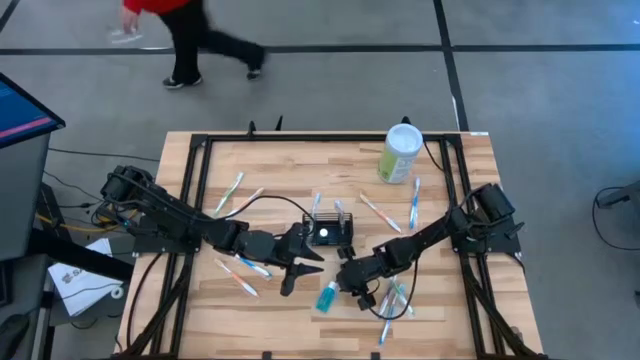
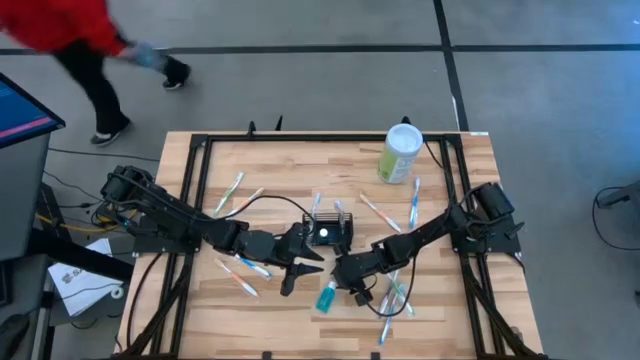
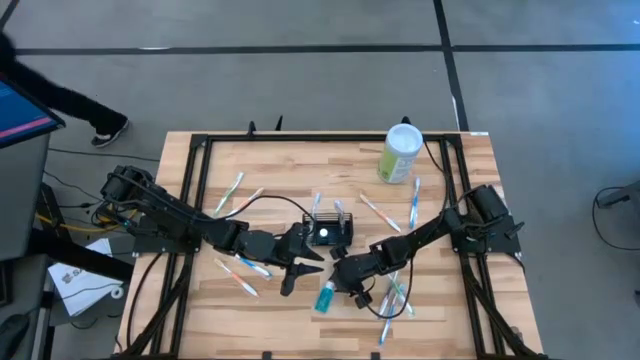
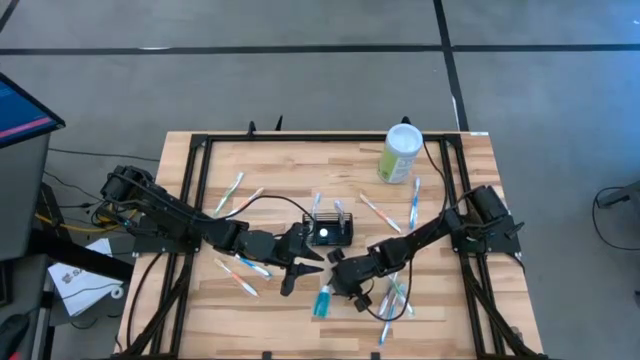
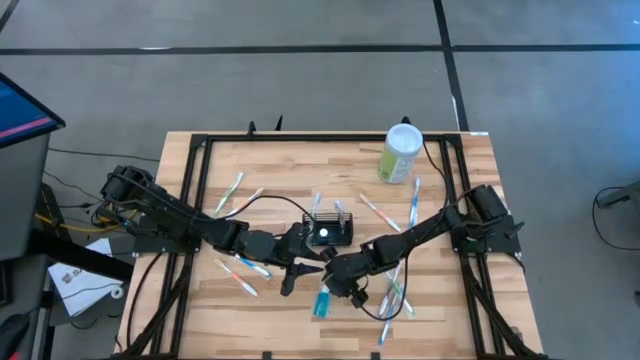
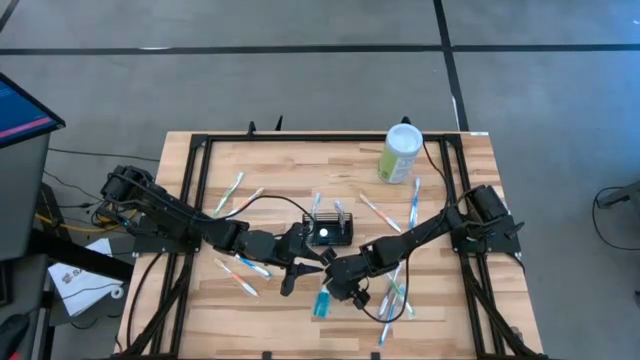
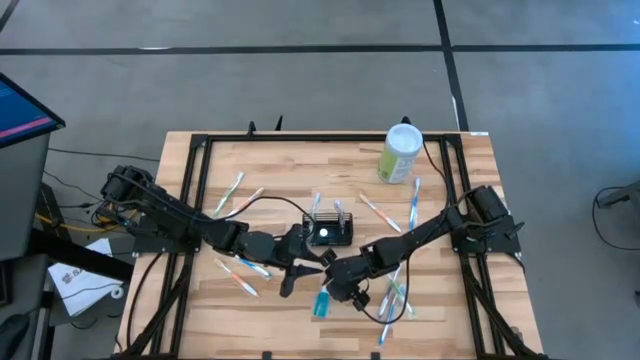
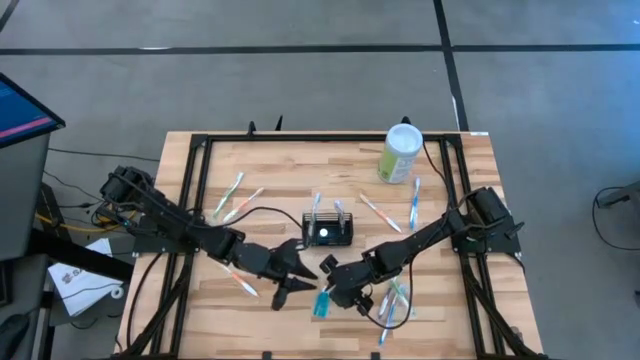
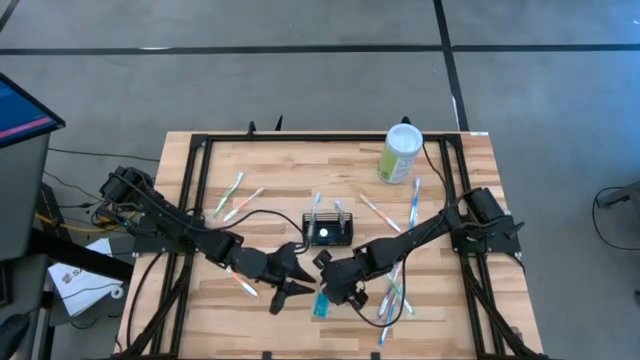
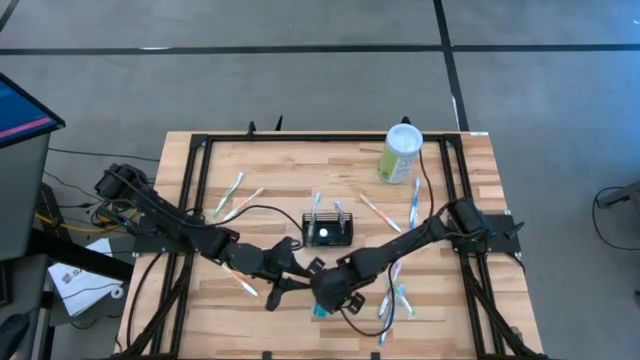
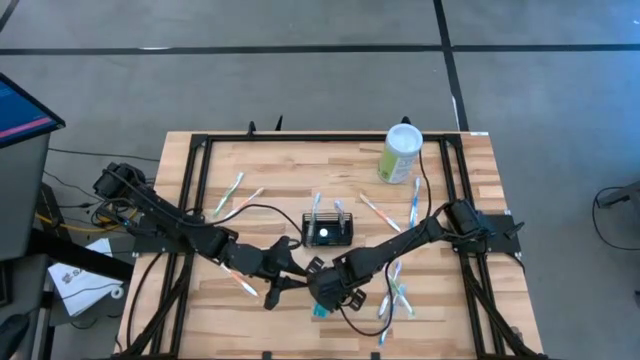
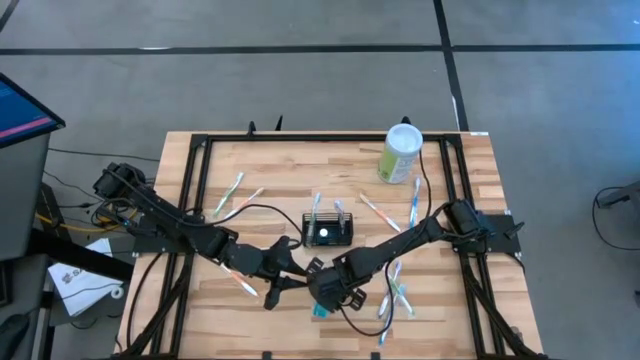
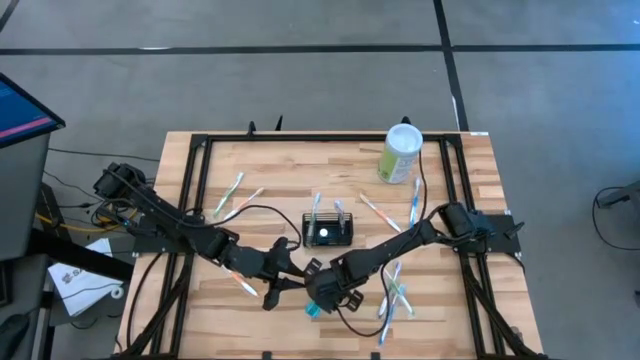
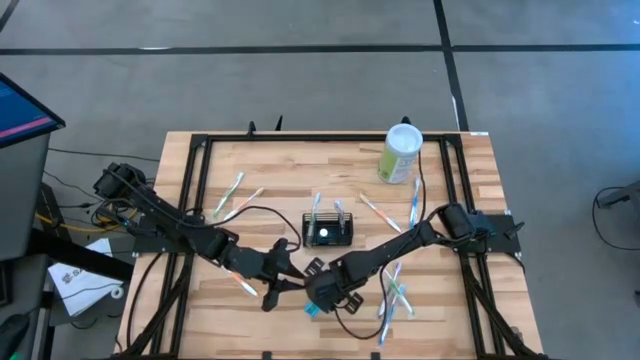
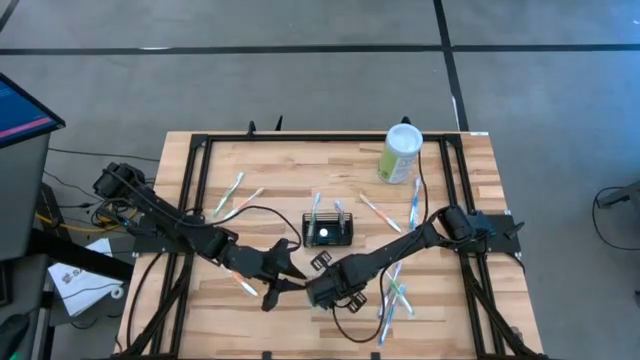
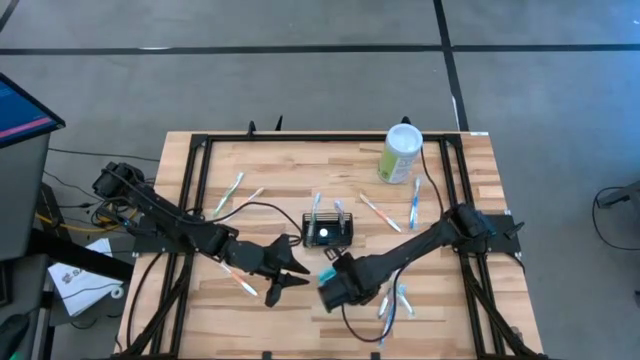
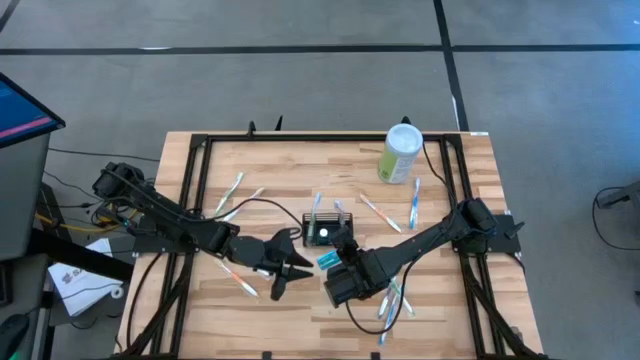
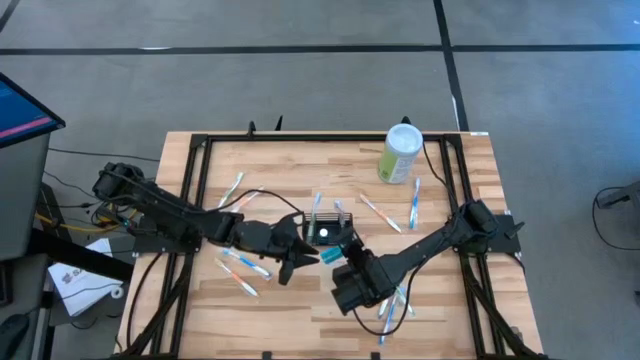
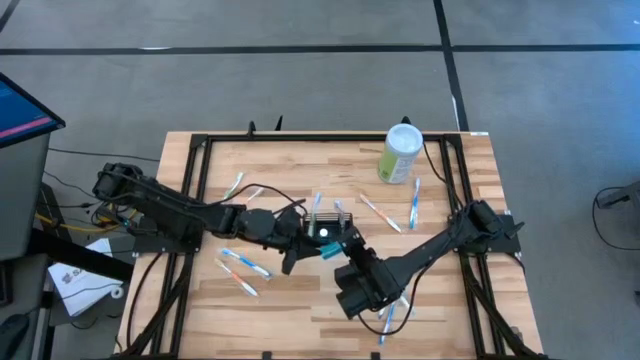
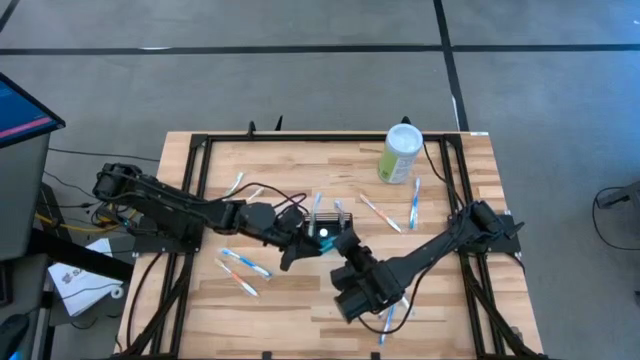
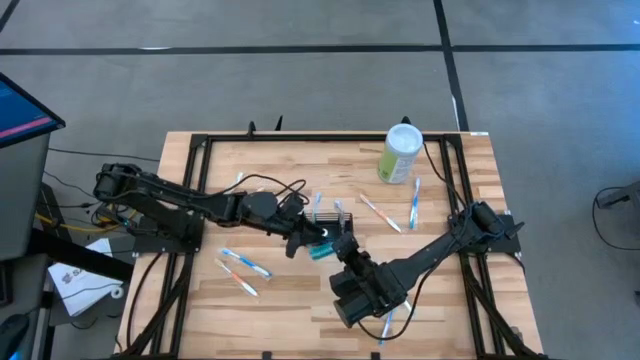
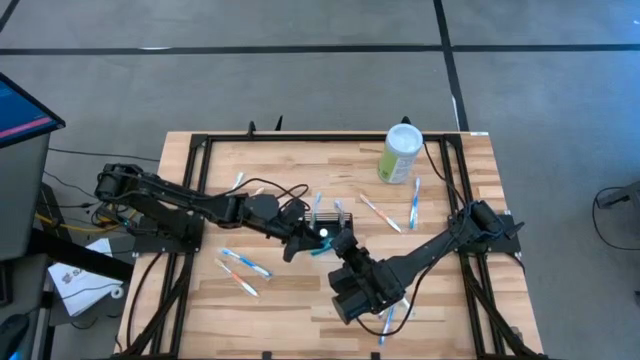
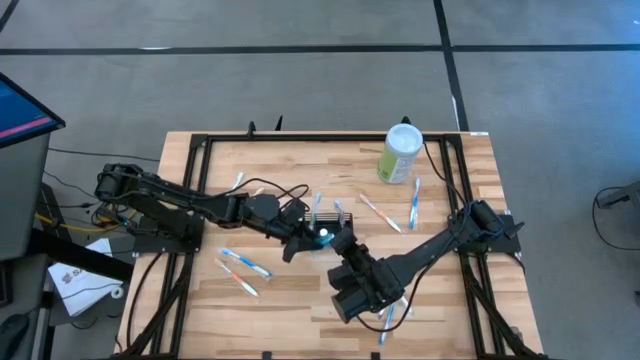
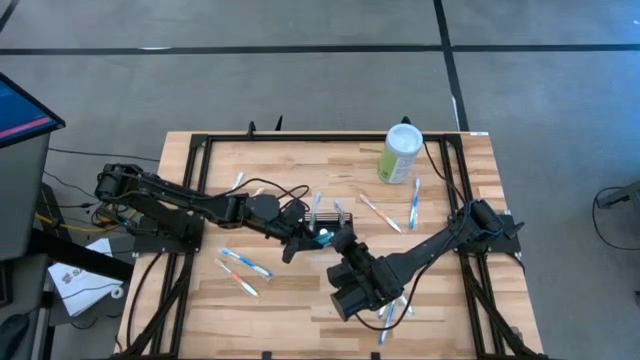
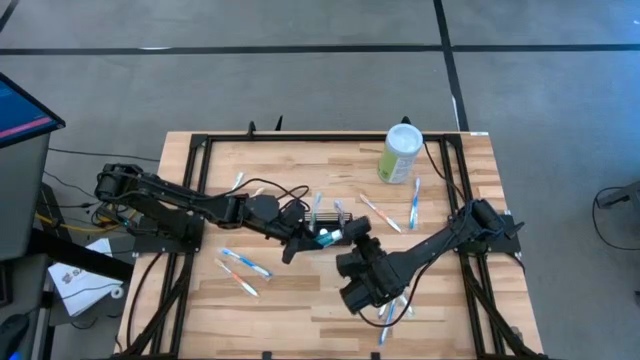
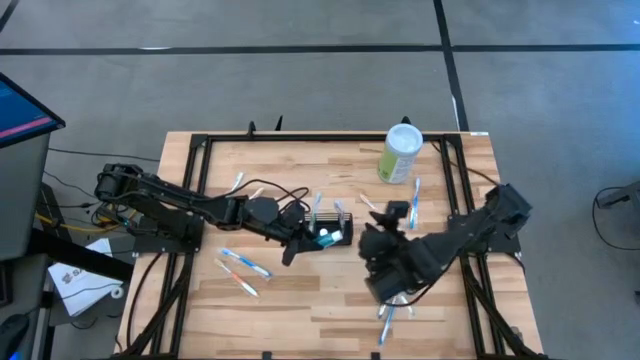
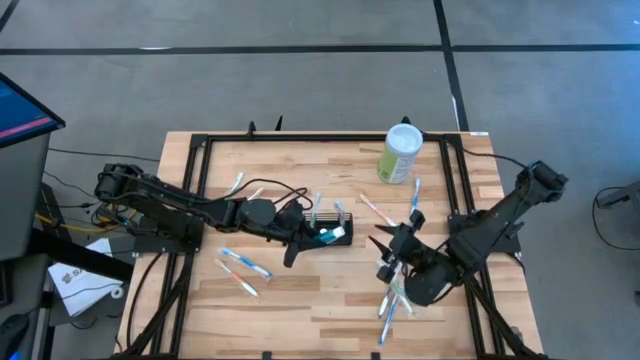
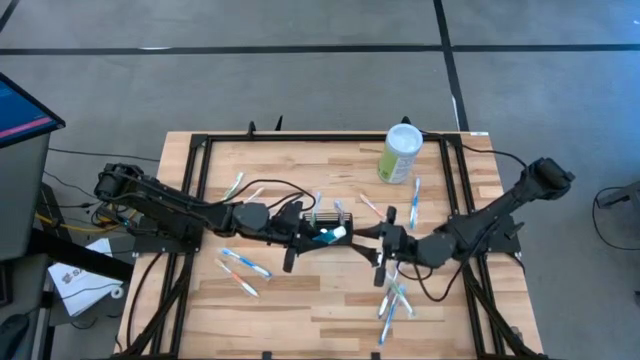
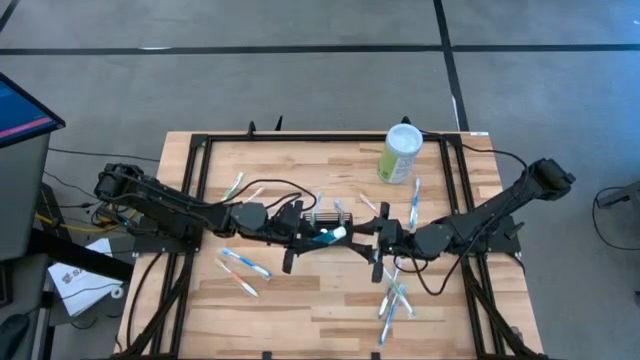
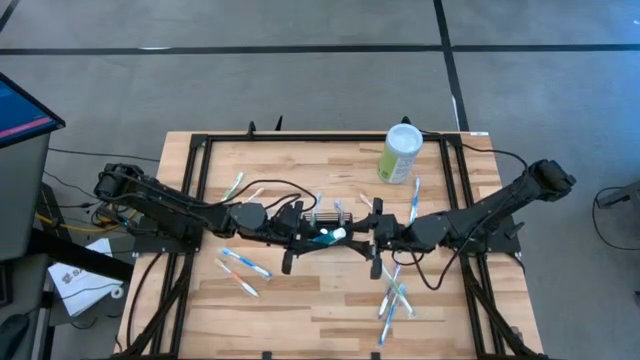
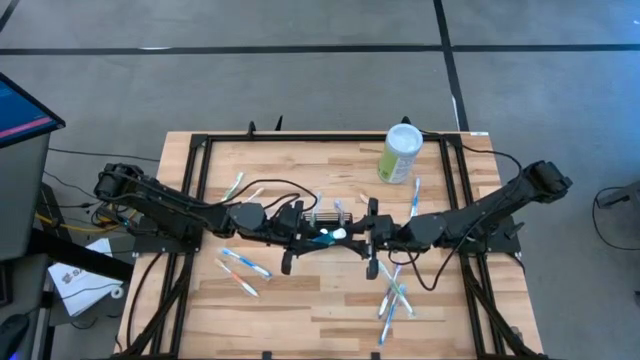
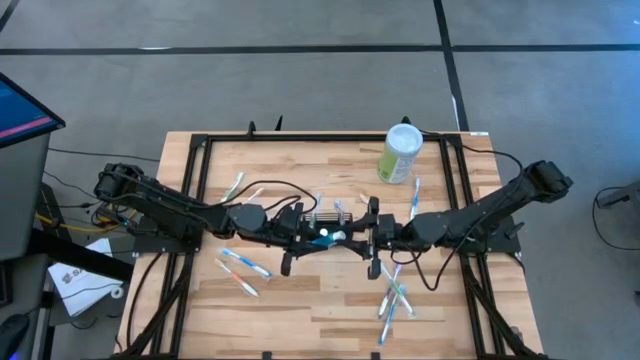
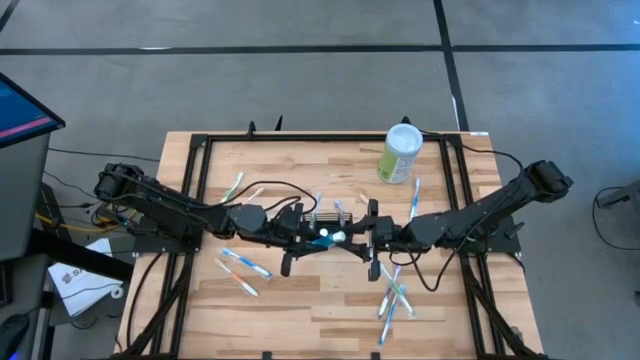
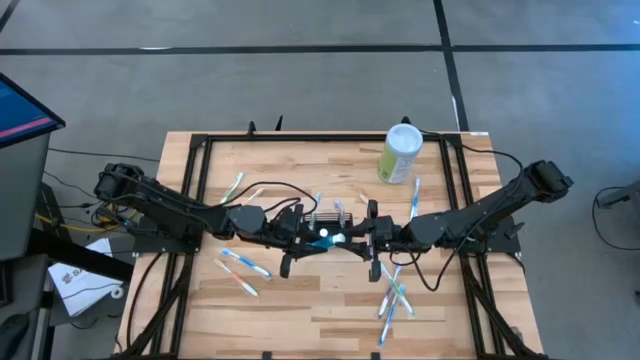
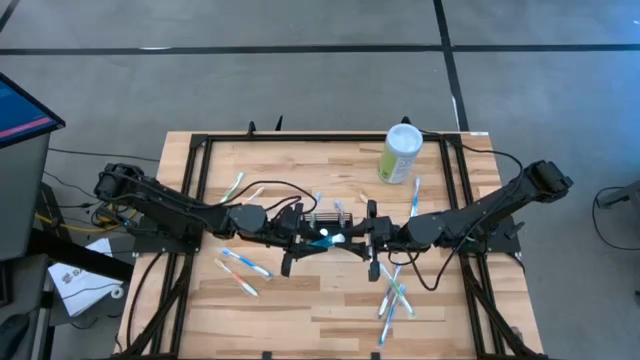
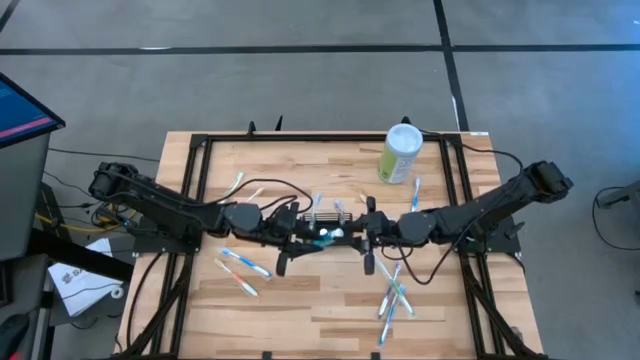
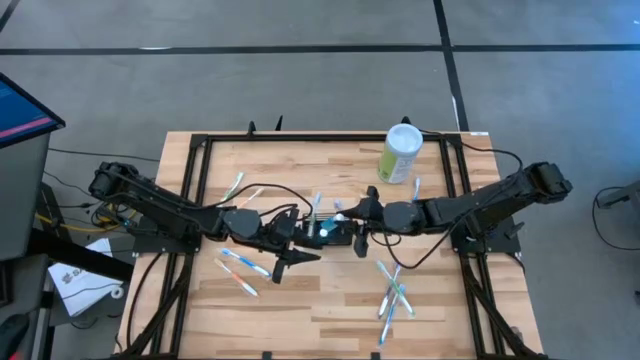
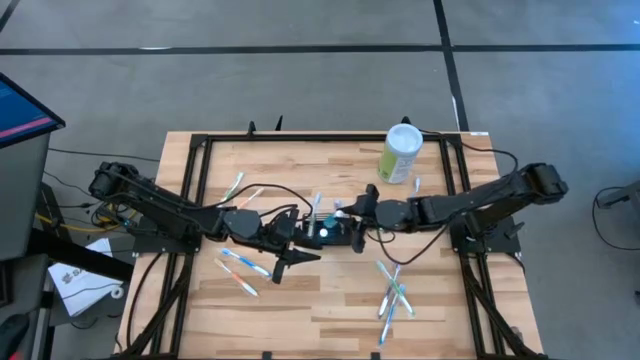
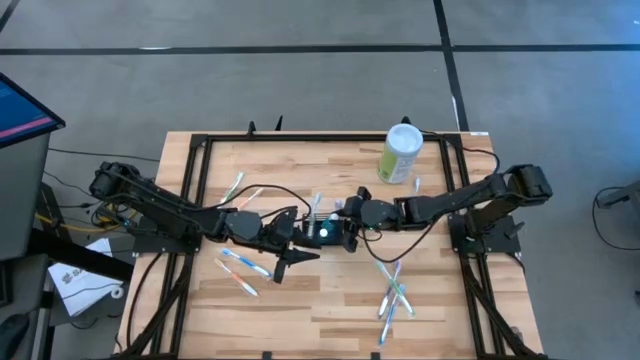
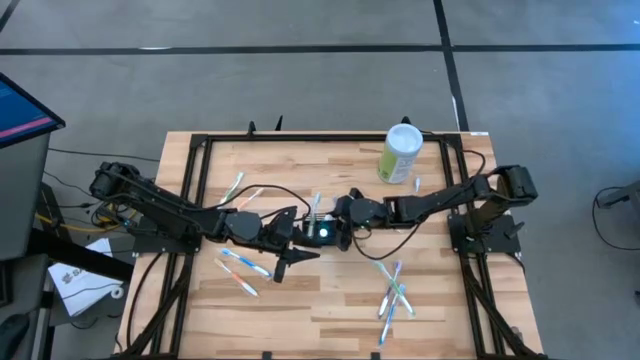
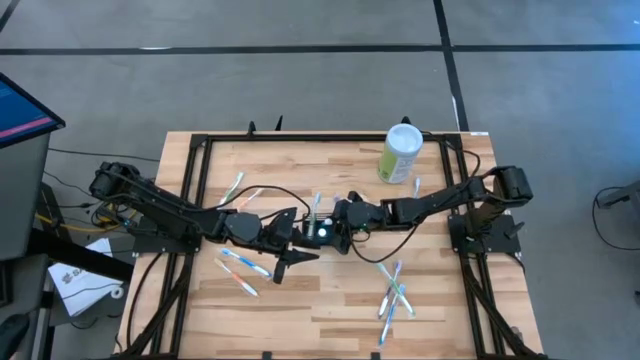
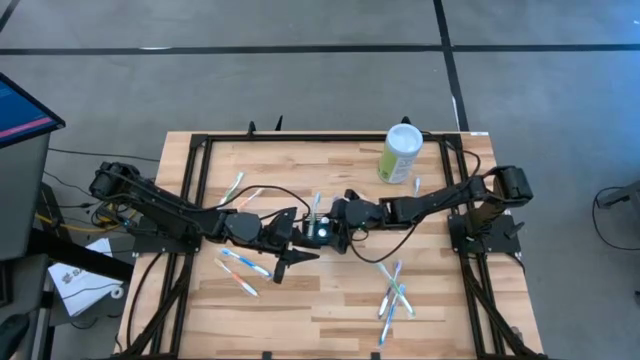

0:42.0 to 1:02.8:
Task: Pick & Place toothbrushing station
Put the mouthwash bottle into the middle compartment of the organizer
